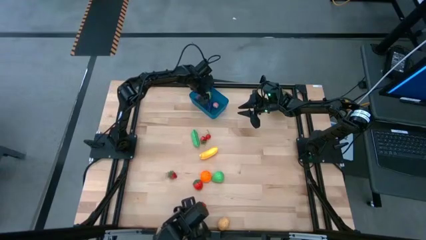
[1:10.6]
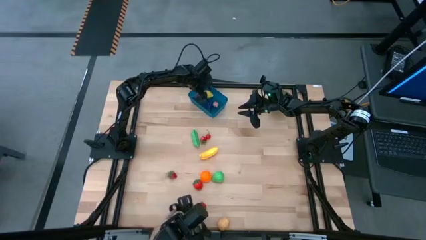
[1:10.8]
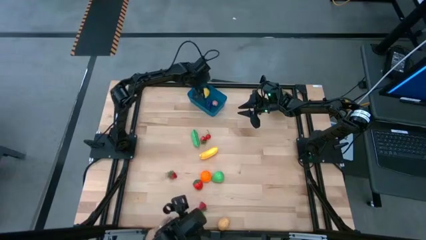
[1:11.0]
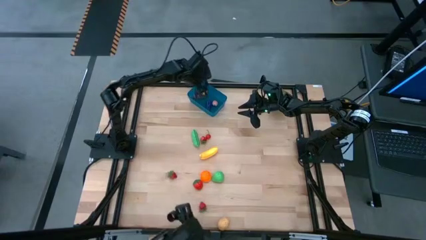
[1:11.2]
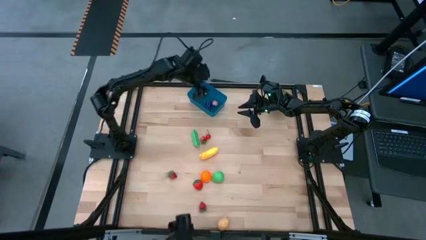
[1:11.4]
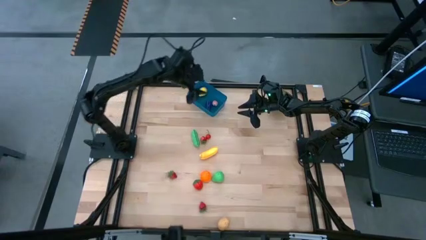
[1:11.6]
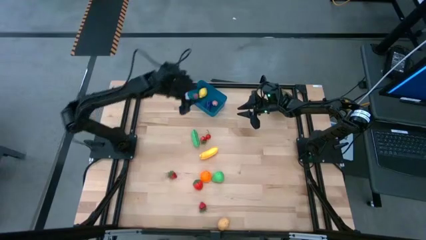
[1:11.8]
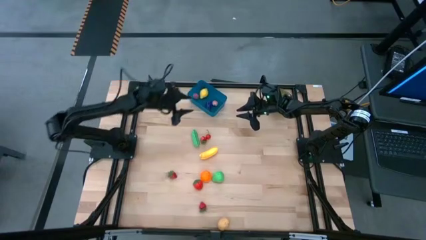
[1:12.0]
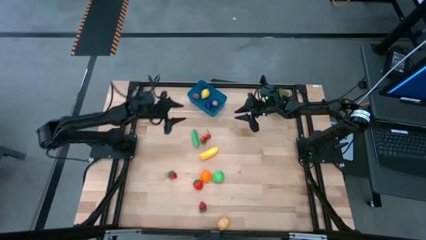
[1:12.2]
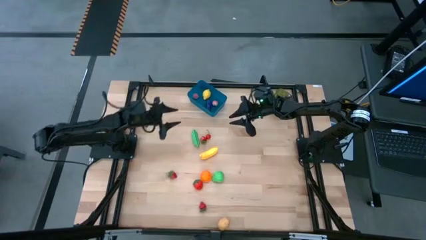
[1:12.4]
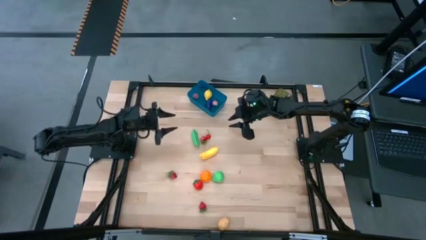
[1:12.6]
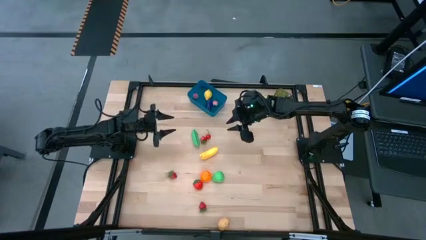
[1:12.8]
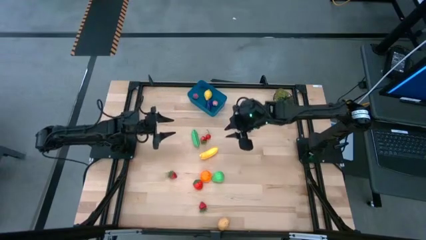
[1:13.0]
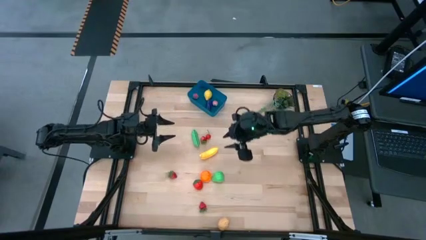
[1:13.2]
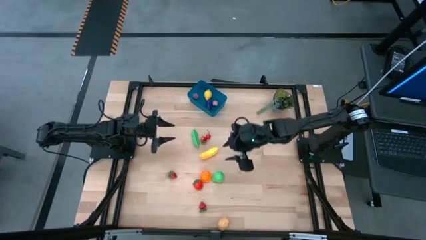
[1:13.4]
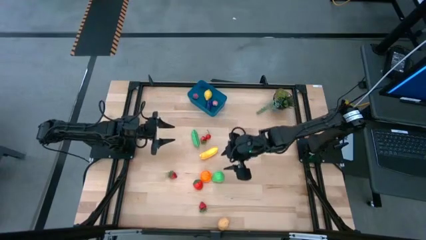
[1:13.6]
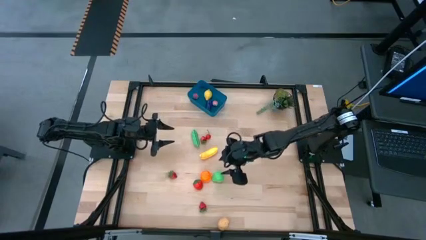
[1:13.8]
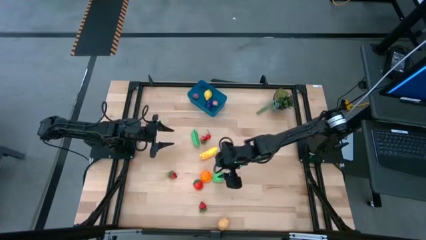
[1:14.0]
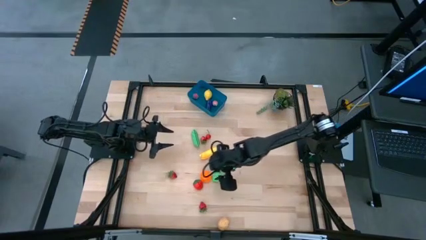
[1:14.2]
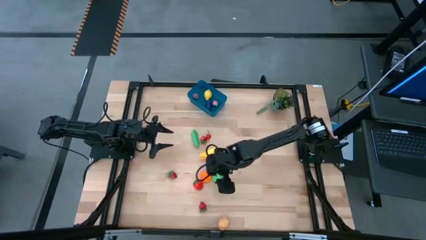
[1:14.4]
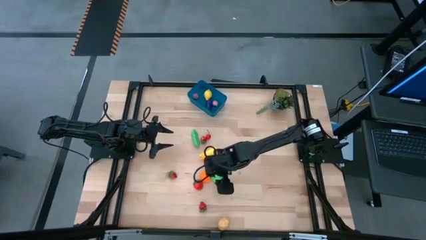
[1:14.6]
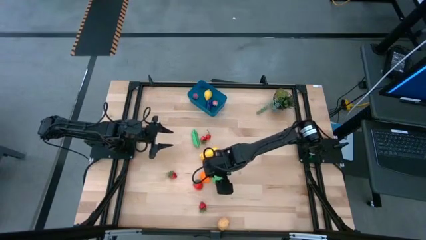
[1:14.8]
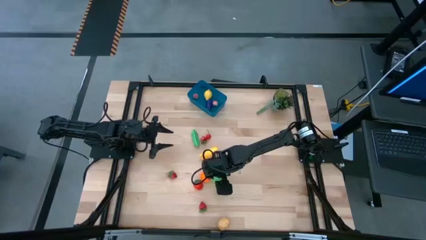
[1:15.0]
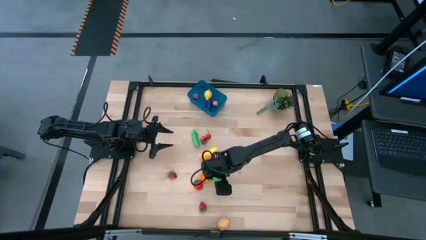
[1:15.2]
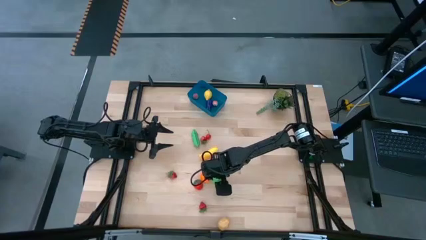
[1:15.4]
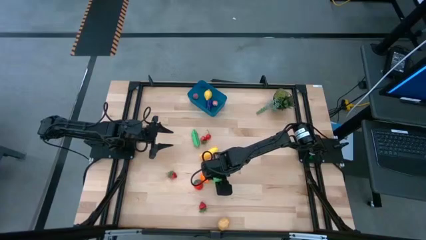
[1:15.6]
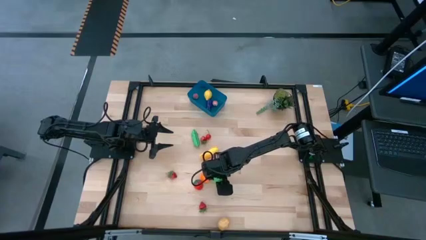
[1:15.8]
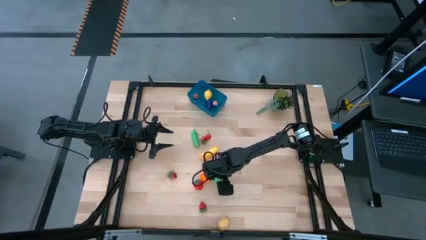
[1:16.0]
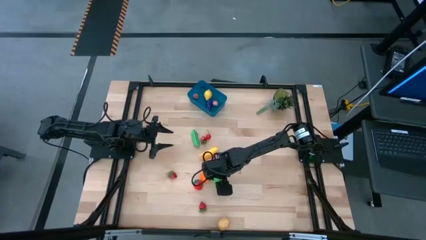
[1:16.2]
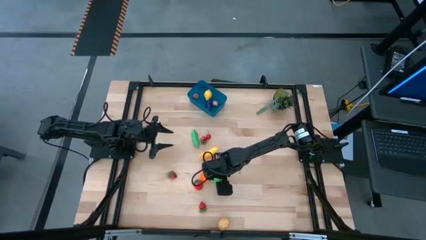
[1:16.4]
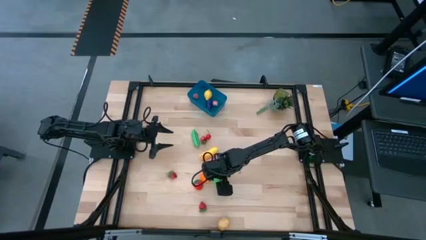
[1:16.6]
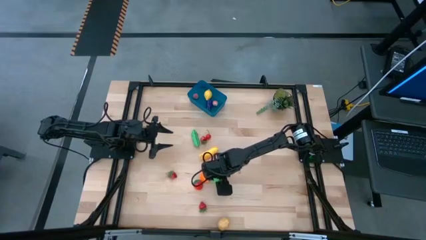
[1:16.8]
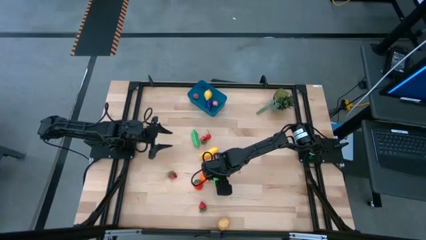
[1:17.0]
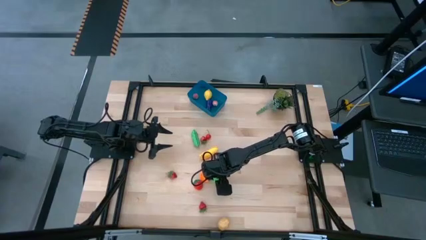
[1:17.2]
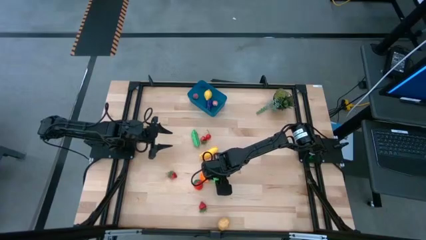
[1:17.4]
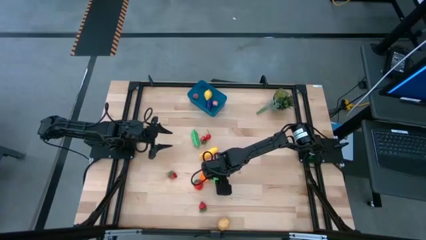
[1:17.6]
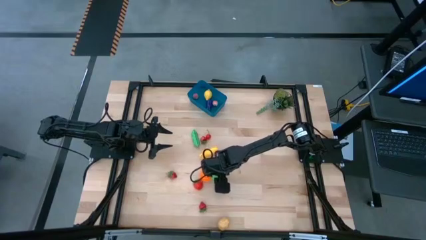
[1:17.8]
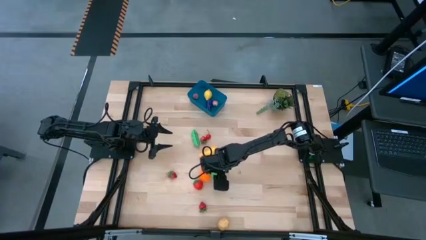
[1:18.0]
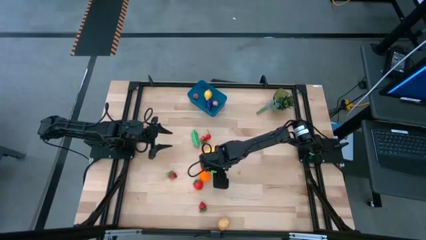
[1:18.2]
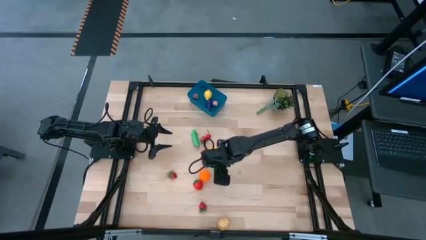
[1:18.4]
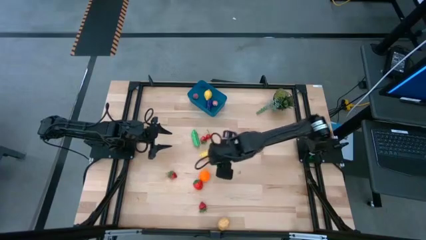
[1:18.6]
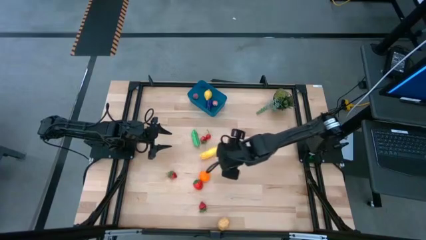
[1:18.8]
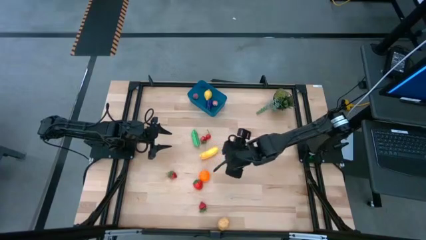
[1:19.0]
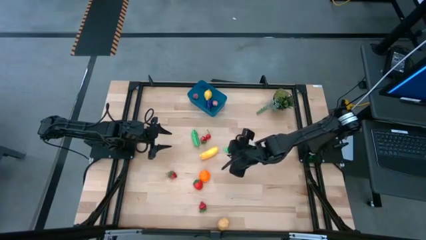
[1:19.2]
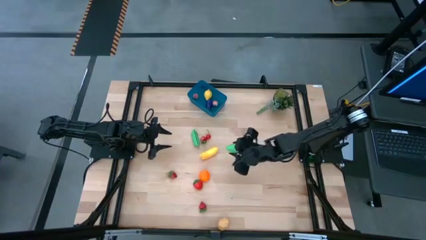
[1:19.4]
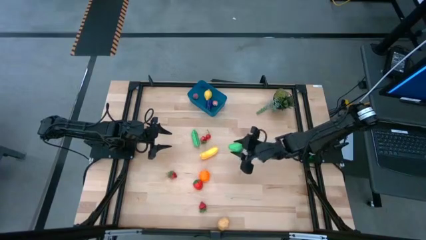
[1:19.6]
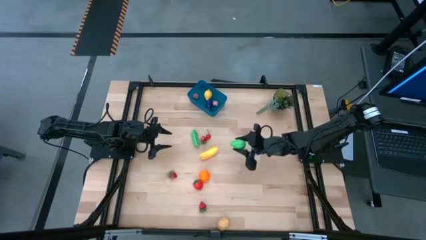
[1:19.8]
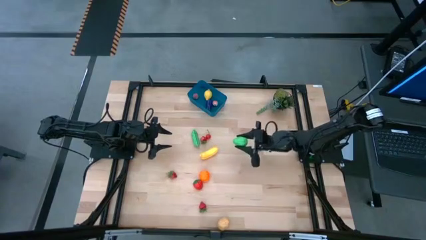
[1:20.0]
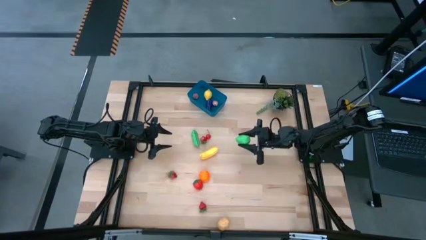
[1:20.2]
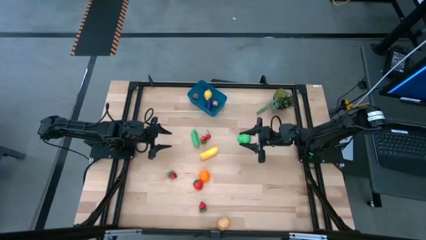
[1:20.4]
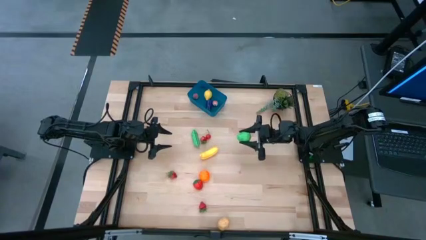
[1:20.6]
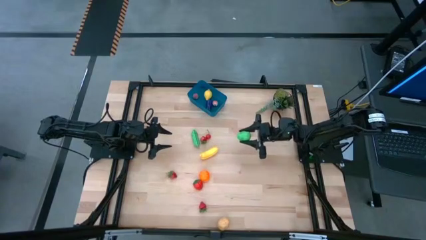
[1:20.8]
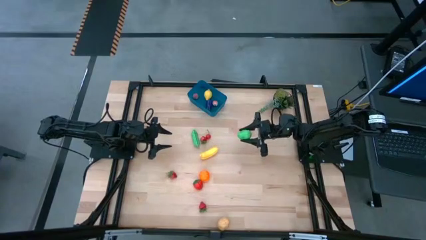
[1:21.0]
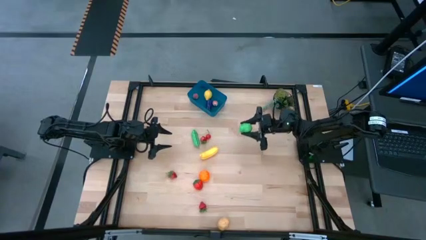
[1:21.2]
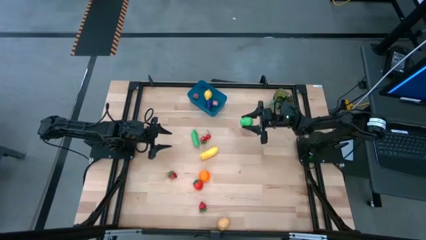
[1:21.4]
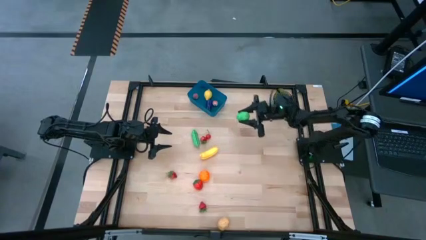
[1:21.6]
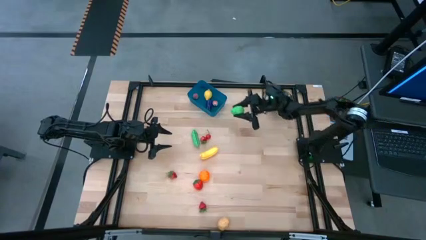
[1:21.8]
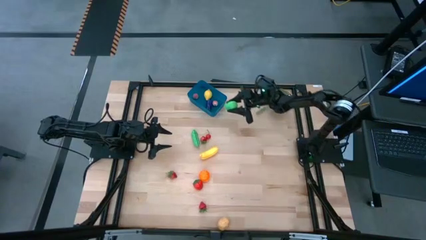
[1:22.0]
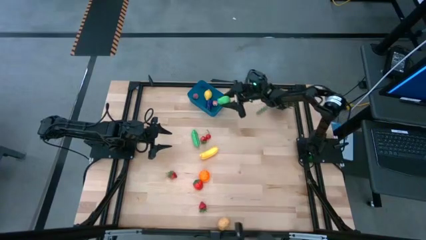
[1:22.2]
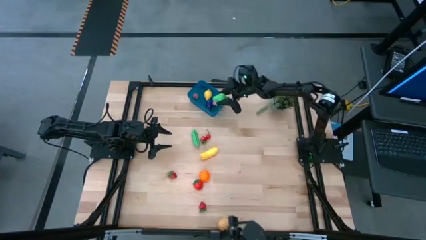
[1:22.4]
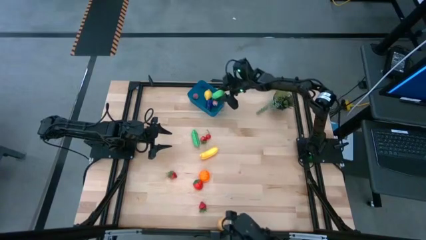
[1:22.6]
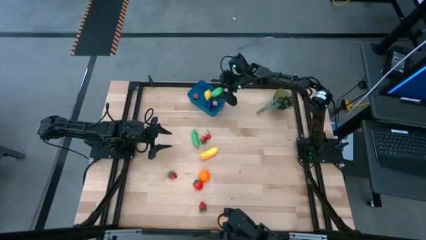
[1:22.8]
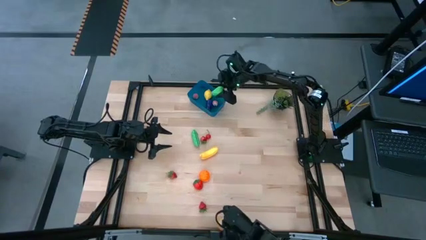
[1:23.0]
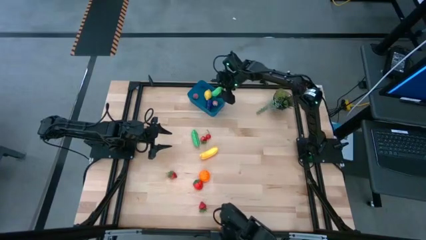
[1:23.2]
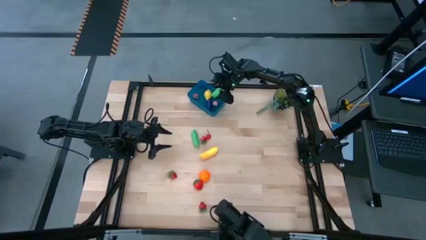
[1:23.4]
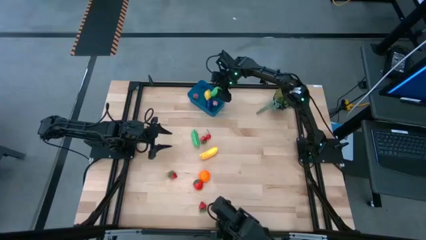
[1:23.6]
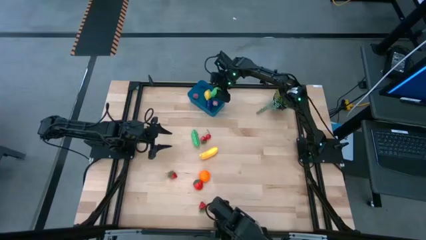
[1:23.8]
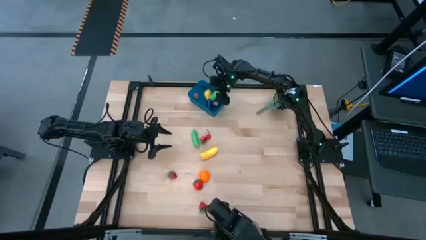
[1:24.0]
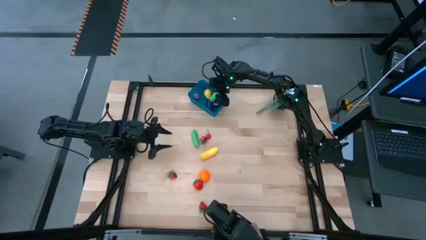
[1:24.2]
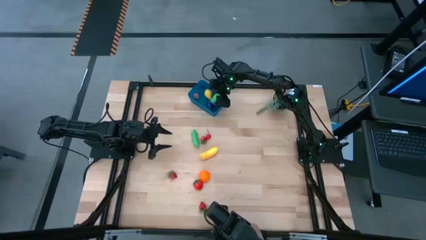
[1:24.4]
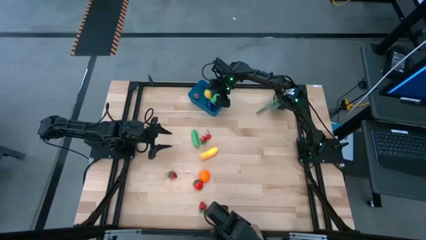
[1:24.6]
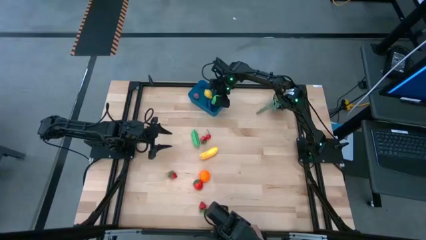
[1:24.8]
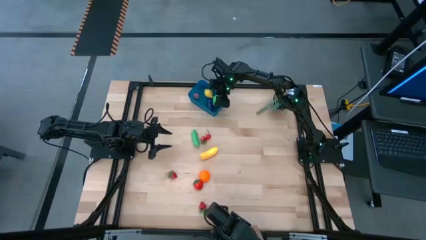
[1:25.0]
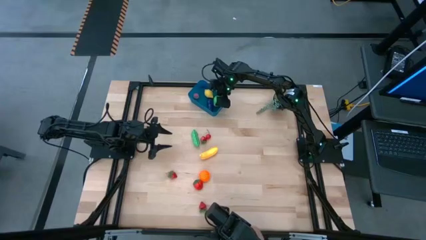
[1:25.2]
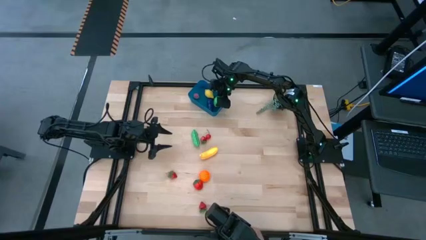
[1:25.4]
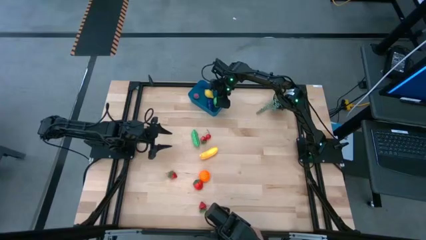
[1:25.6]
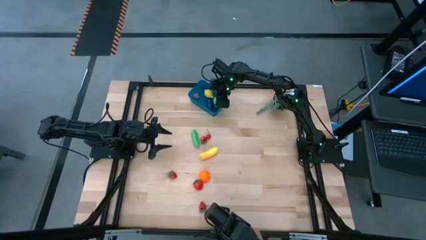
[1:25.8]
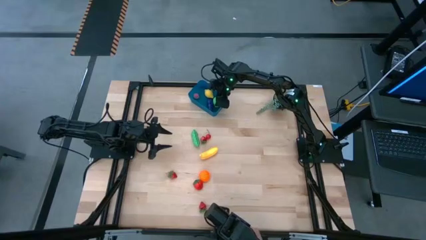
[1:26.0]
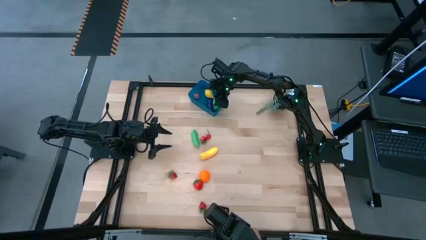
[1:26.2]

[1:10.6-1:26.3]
Task: Pick and placing Produce into tupperware
Put the green pear into the blue bin
